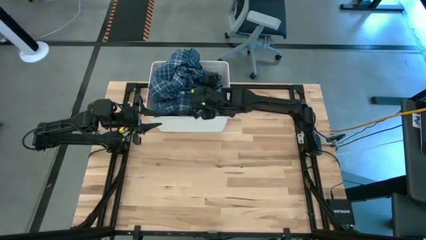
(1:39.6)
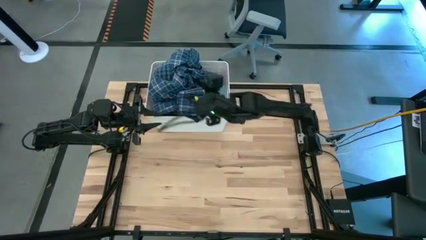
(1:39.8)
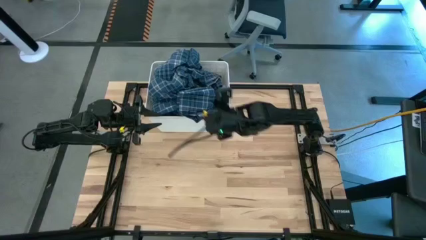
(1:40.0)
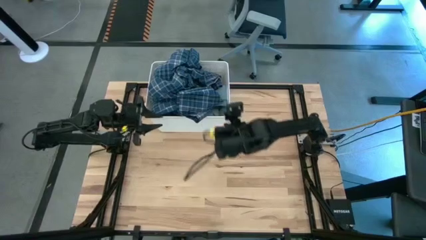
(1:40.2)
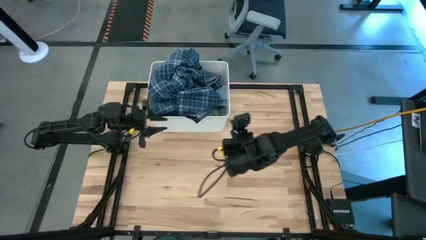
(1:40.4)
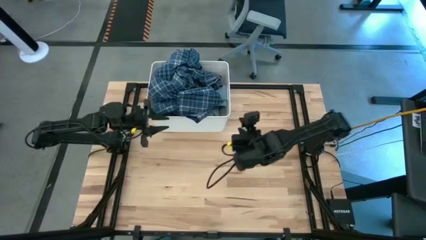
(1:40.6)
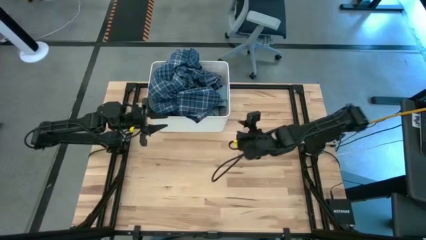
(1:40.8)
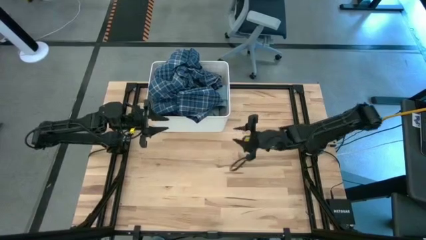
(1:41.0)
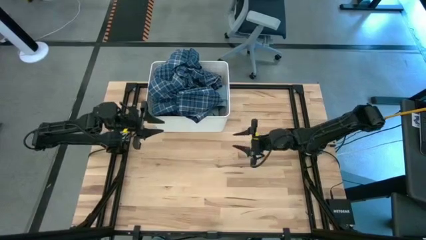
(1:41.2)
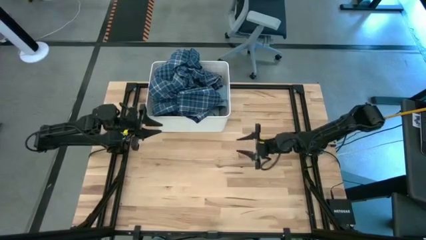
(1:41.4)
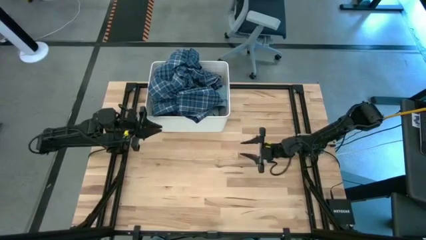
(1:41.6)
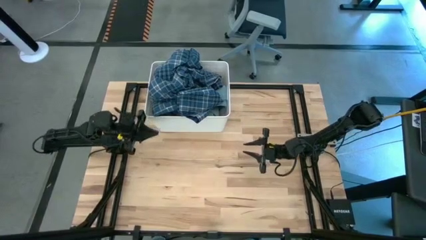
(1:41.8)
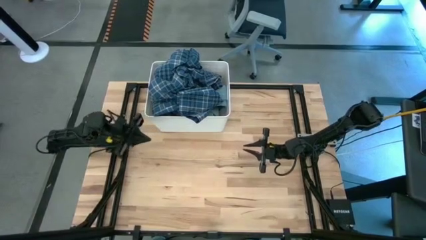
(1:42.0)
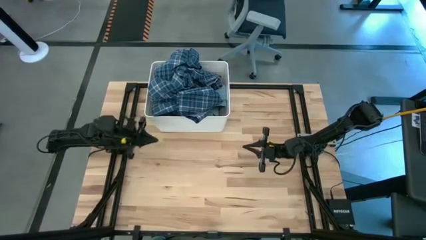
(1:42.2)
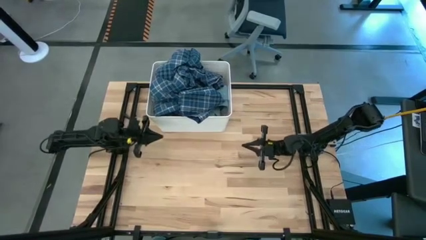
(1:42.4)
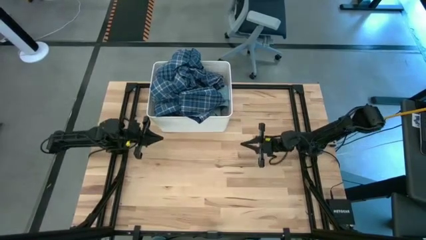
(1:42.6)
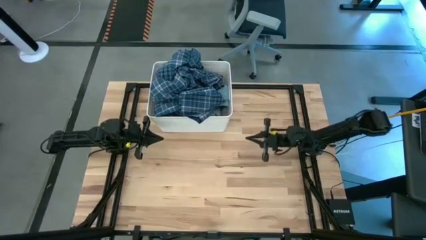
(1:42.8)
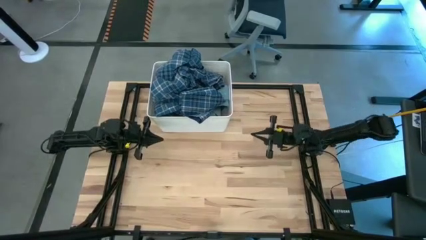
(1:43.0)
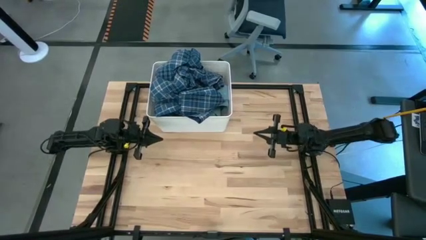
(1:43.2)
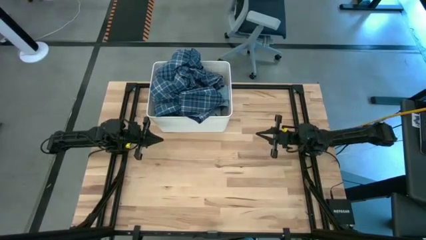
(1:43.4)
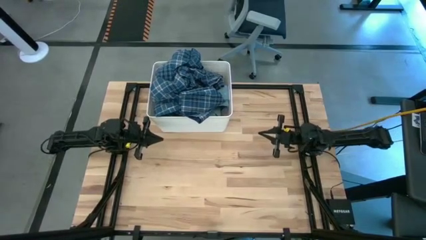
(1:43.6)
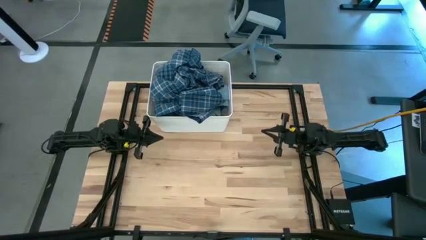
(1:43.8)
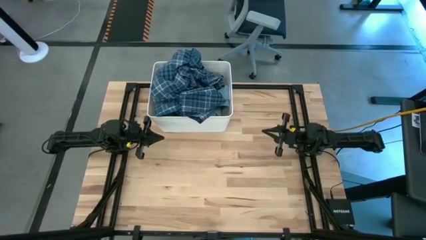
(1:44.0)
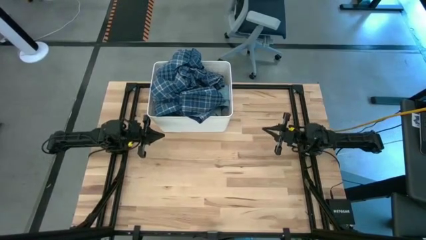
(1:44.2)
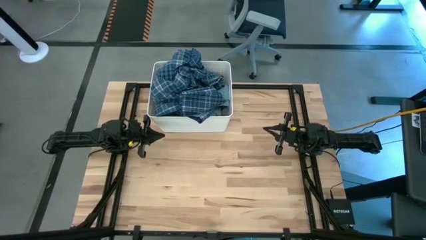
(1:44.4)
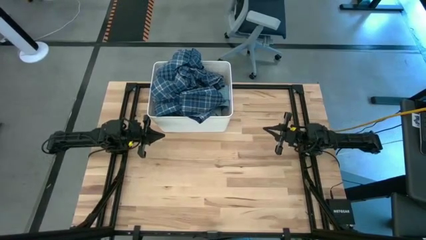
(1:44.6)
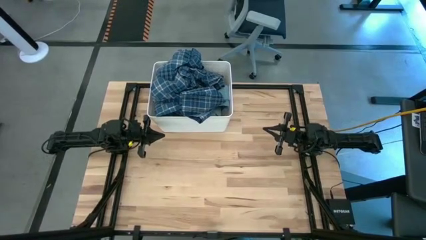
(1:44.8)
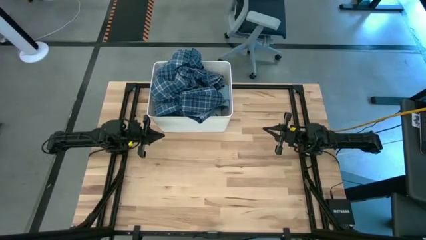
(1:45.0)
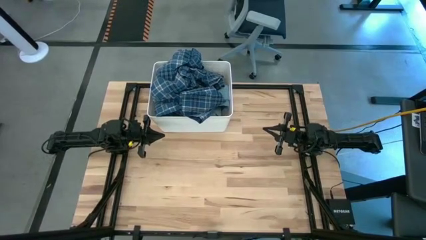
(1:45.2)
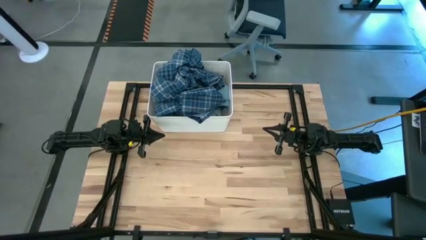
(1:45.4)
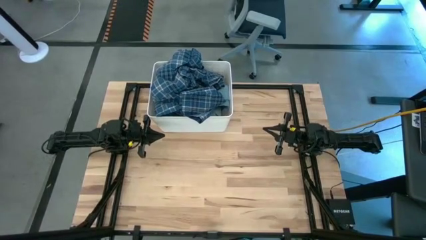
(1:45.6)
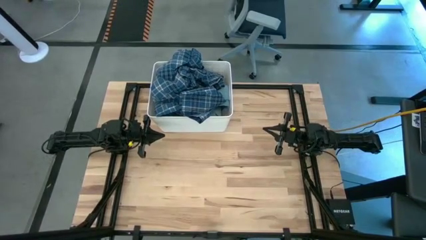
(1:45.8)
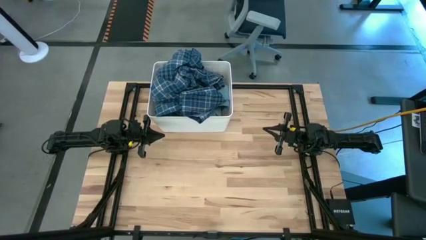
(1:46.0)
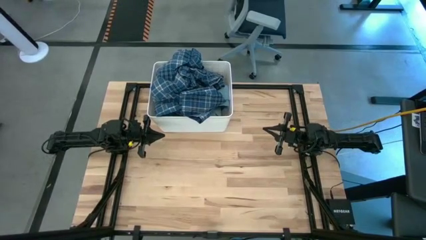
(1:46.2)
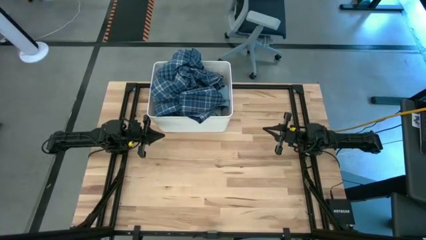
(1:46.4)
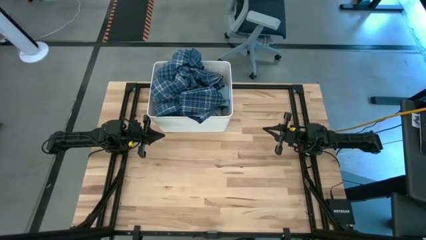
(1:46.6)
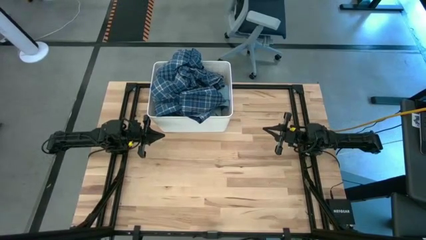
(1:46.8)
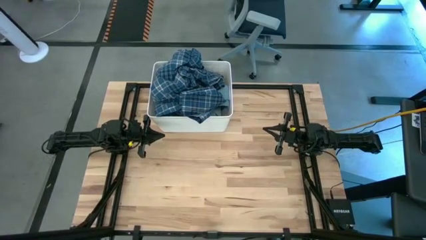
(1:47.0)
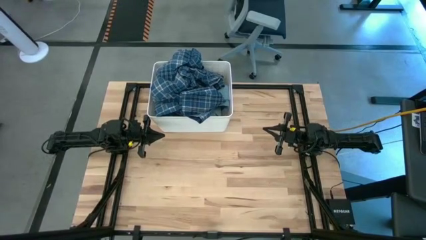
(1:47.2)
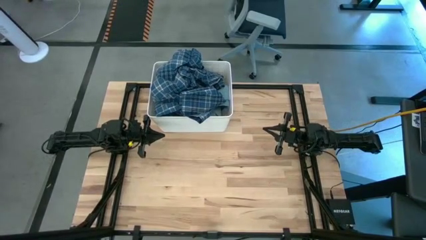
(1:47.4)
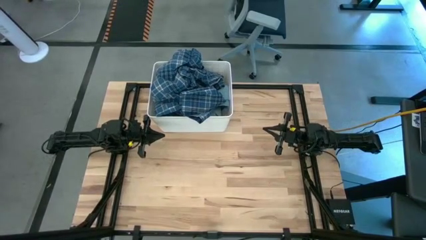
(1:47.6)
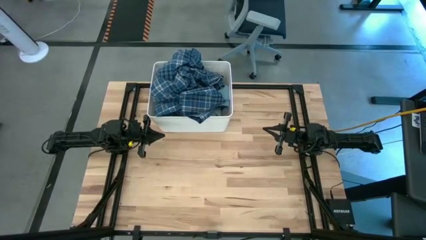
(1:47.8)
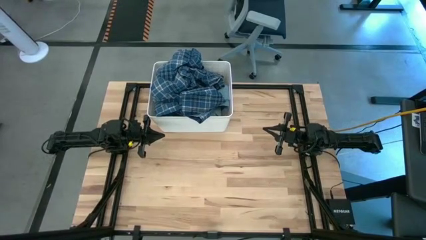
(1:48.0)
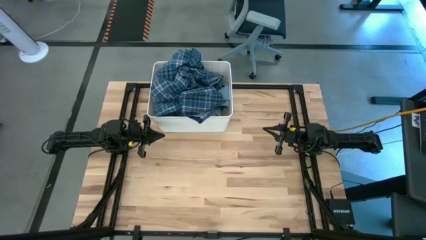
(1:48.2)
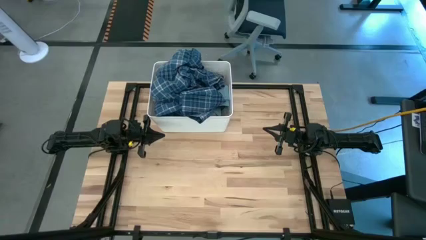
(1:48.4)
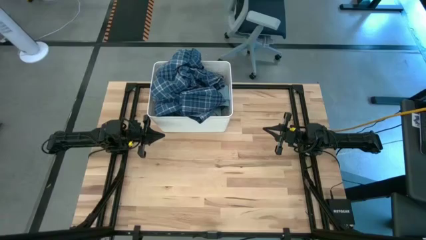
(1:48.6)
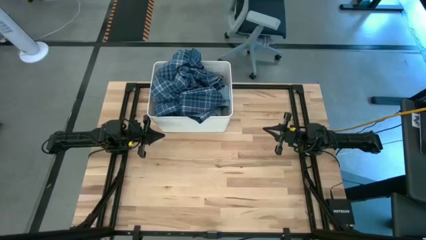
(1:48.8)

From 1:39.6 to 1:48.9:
Task: Sort clothes
Return to Home Position

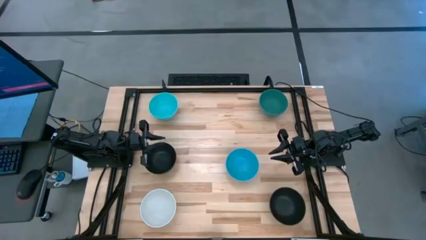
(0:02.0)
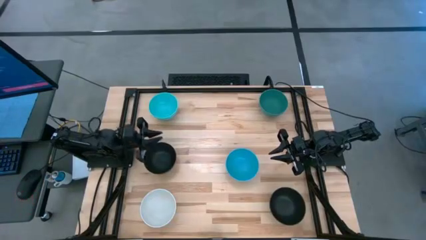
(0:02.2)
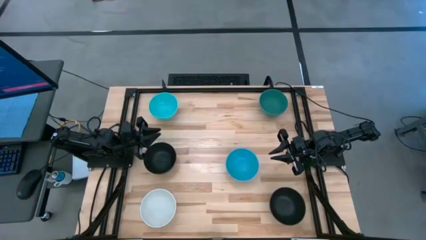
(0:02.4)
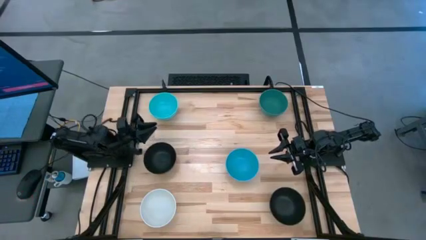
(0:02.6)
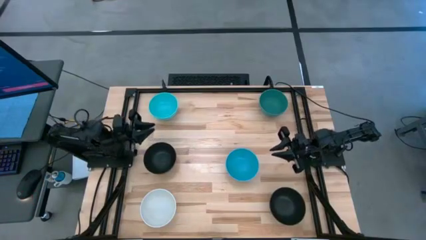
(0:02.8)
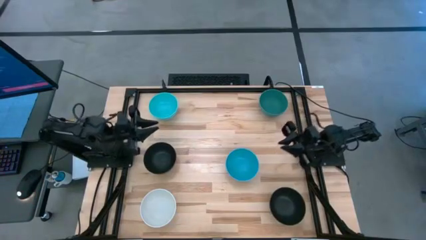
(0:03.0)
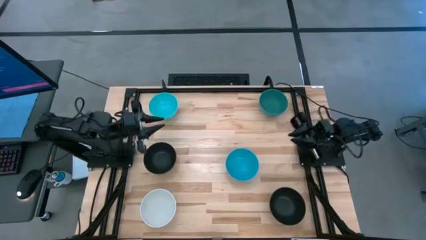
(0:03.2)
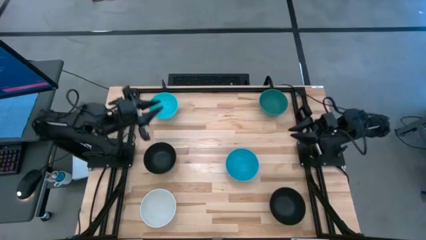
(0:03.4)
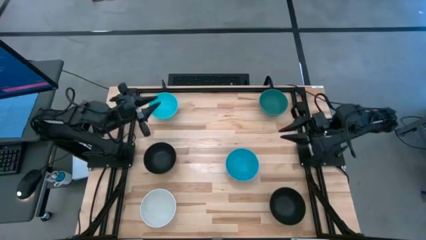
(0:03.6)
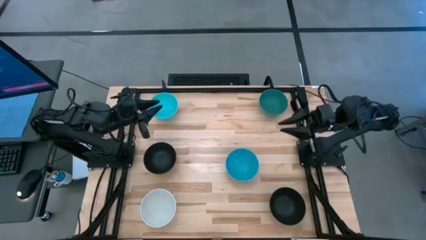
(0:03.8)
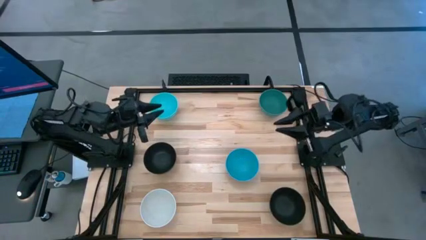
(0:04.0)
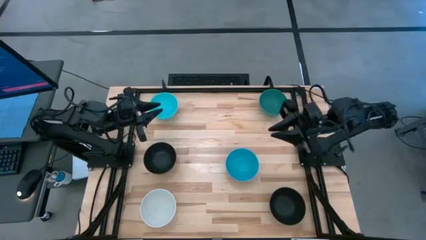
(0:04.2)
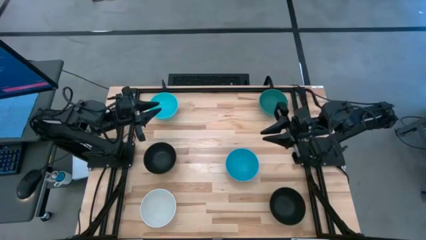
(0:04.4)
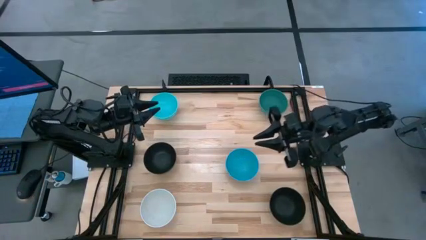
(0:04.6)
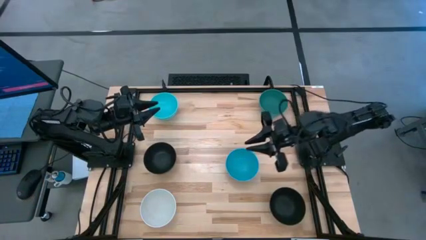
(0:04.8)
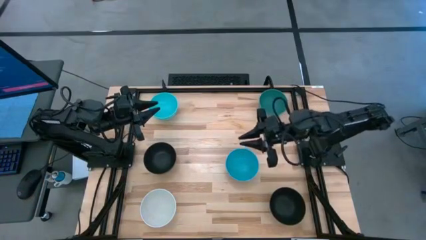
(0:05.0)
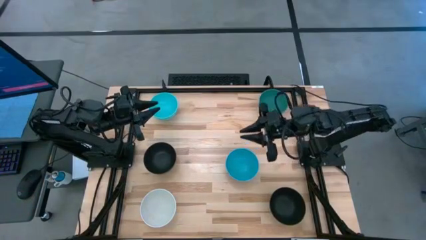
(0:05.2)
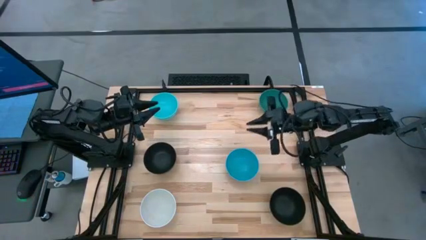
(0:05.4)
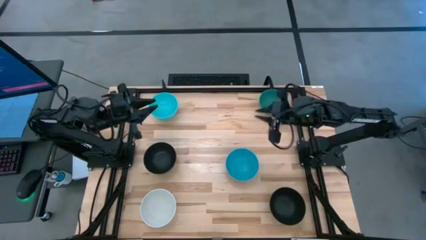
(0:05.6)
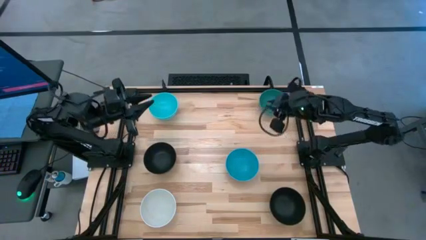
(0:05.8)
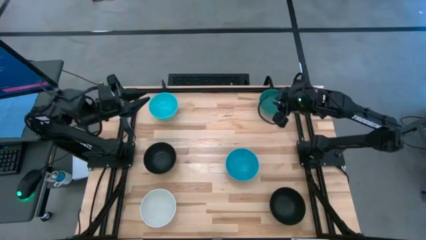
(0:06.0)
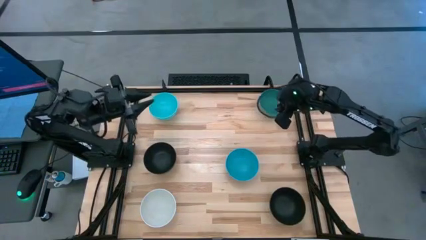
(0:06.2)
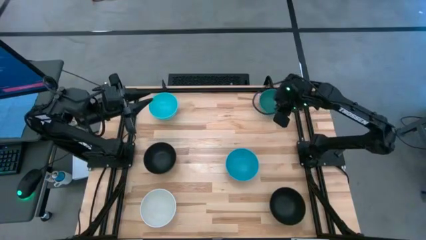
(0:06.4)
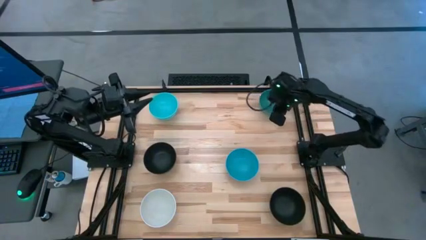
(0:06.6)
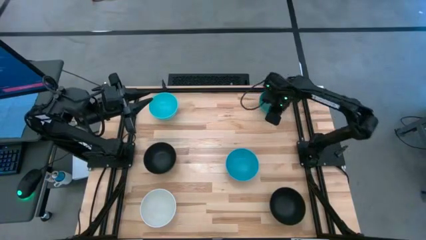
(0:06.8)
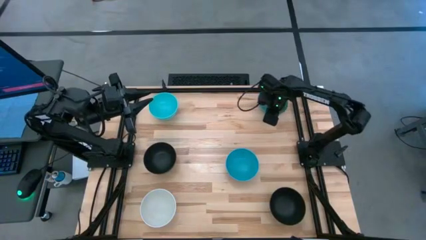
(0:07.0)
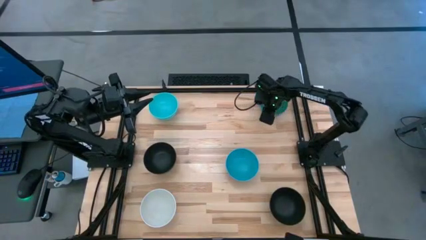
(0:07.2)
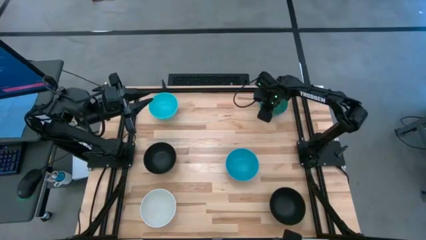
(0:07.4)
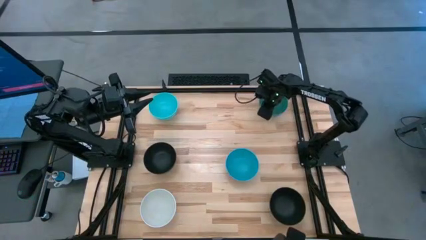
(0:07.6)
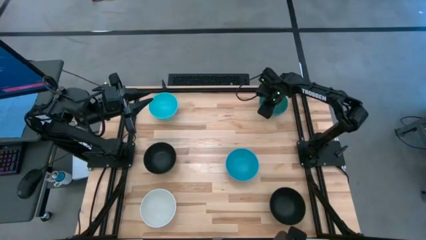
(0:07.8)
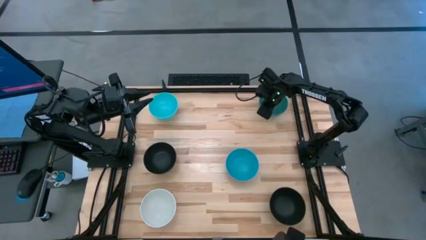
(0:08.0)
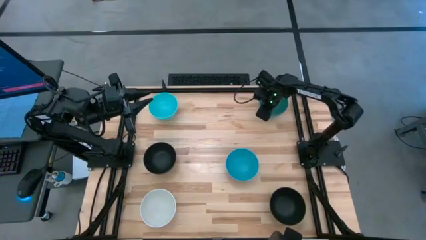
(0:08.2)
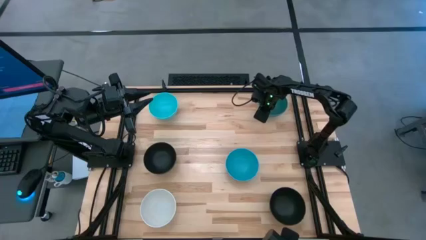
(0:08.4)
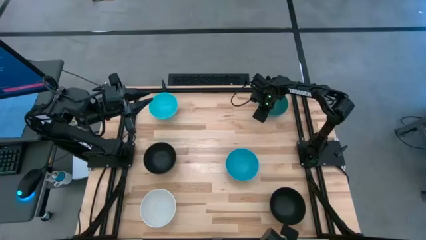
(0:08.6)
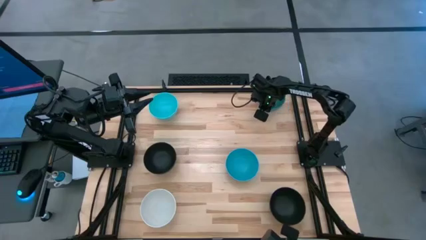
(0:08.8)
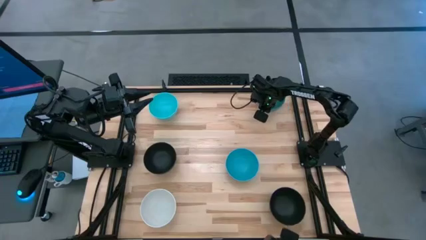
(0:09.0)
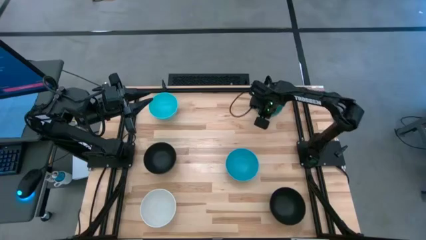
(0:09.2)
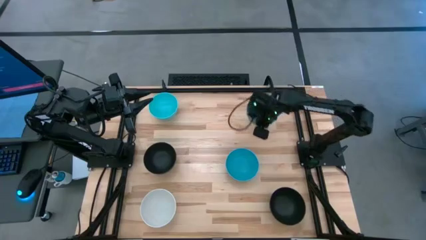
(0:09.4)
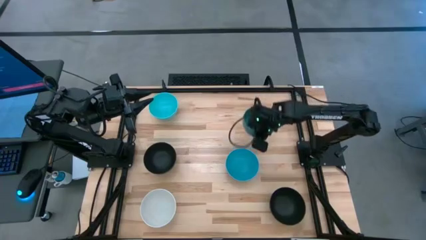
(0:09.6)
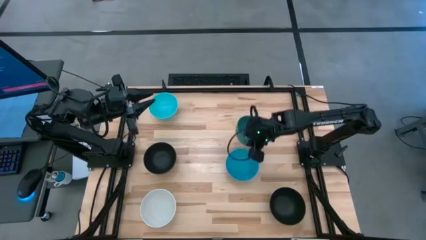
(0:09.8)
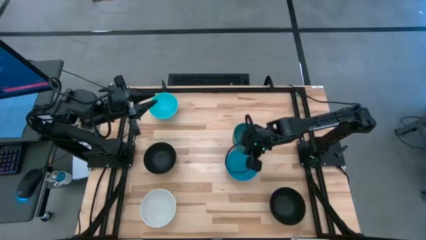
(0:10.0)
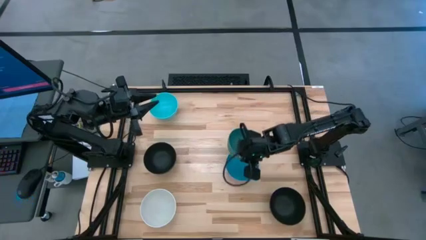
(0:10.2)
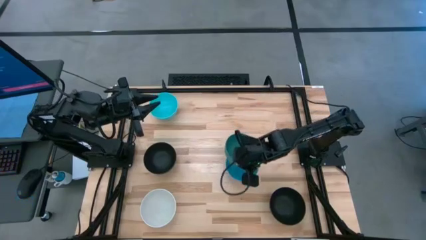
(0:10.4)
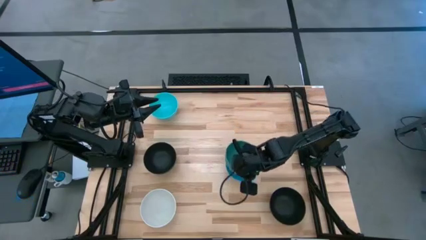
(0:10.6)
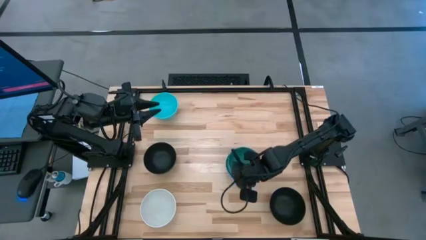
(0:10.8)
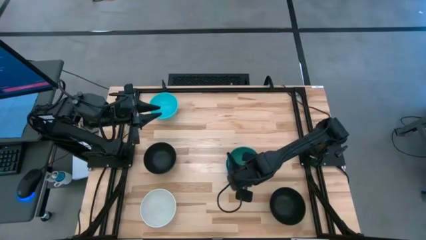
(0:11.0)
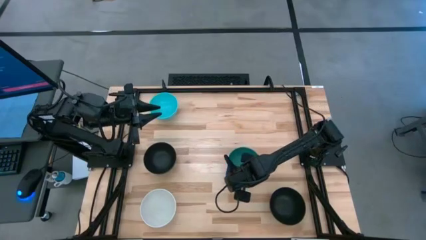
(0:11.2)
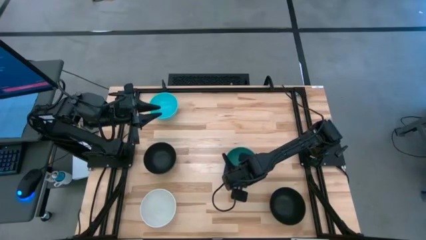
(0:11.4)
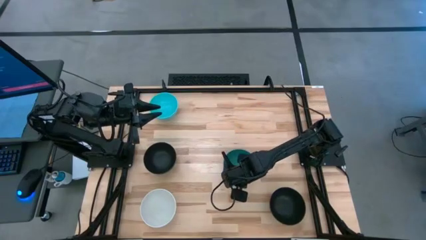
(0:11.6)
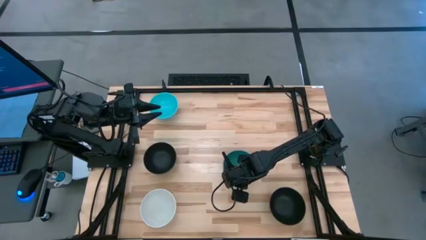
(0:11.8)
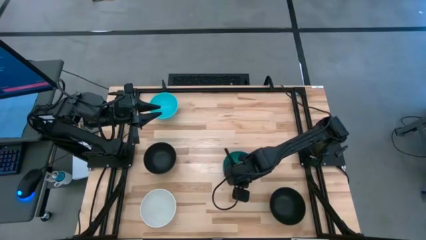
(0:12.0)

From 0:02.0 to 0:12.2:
Task: Nest bowls inside each other
Stack the green bowl on top of the blue bowl
